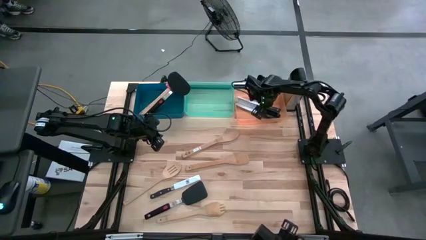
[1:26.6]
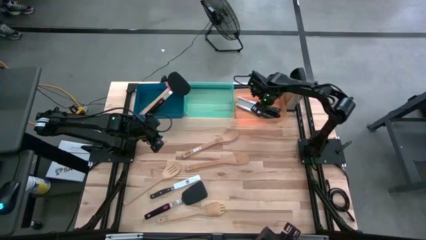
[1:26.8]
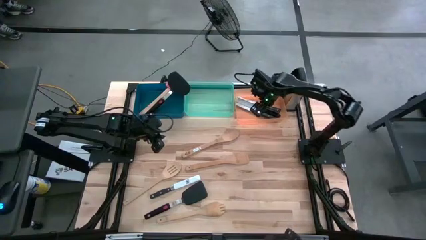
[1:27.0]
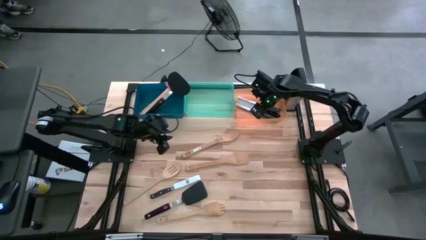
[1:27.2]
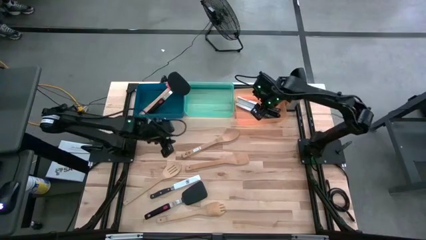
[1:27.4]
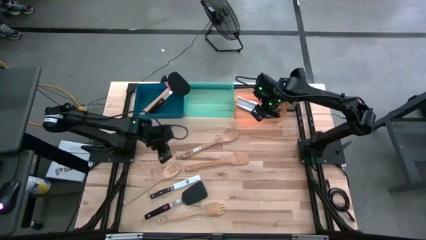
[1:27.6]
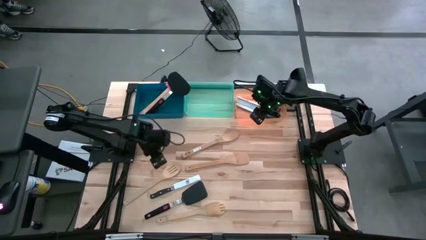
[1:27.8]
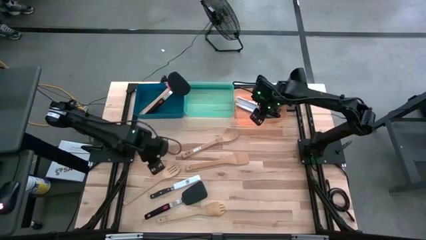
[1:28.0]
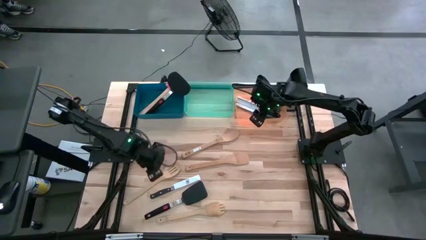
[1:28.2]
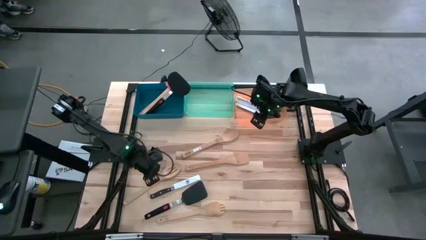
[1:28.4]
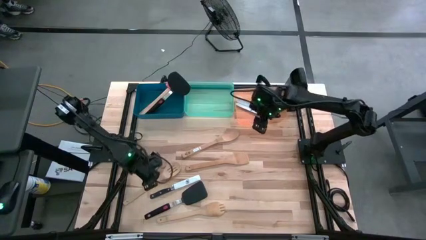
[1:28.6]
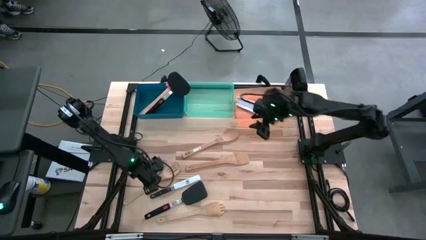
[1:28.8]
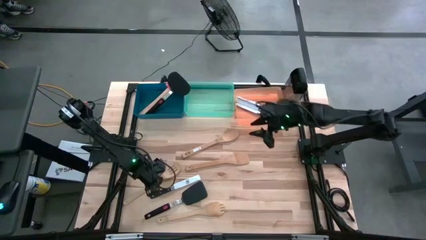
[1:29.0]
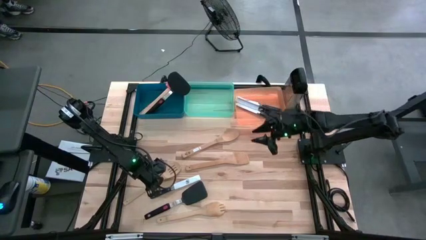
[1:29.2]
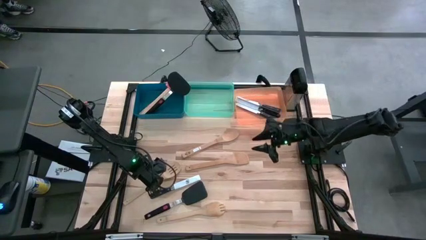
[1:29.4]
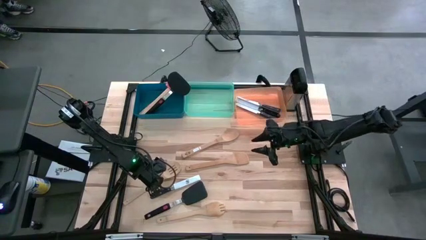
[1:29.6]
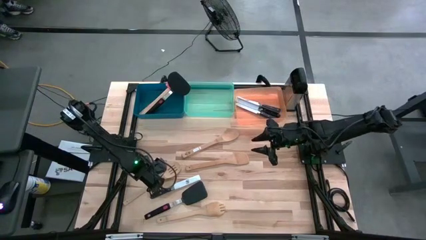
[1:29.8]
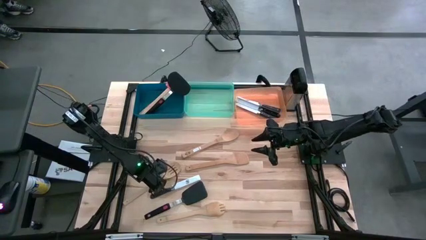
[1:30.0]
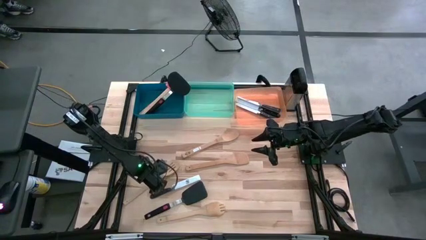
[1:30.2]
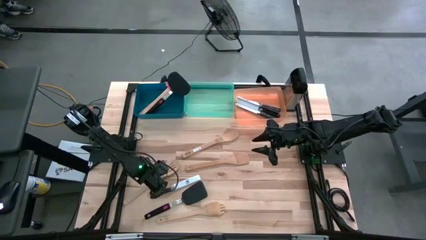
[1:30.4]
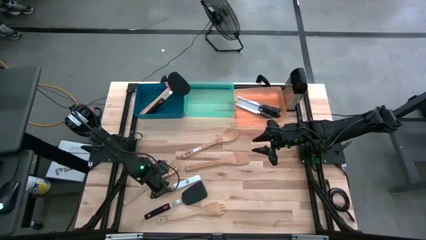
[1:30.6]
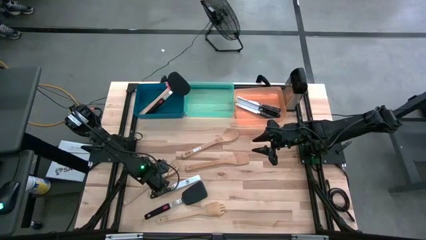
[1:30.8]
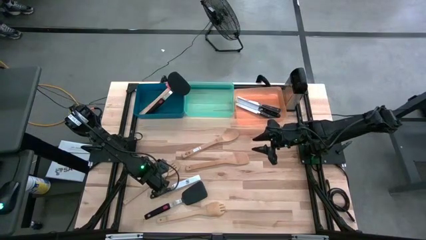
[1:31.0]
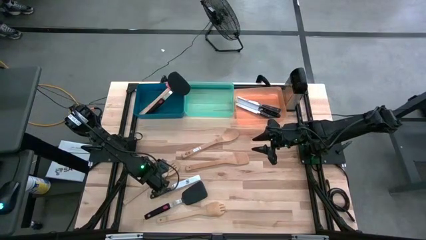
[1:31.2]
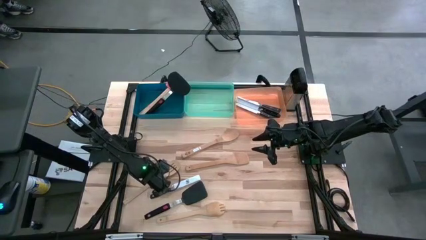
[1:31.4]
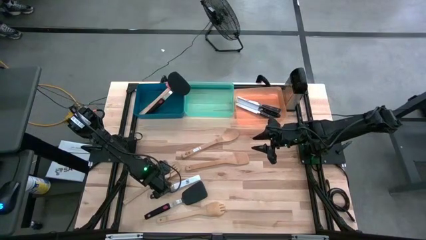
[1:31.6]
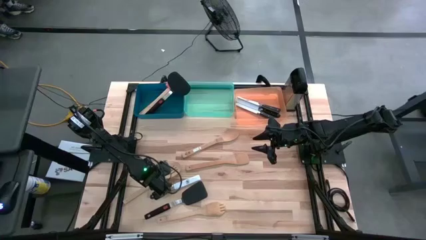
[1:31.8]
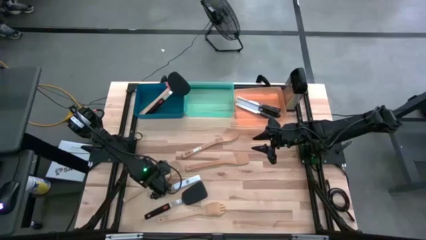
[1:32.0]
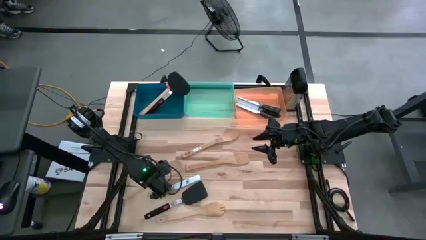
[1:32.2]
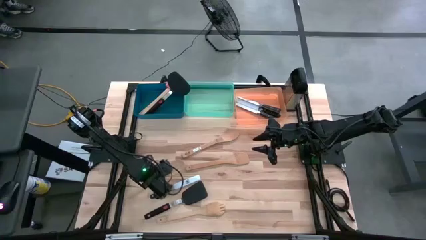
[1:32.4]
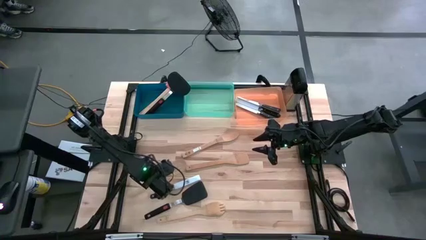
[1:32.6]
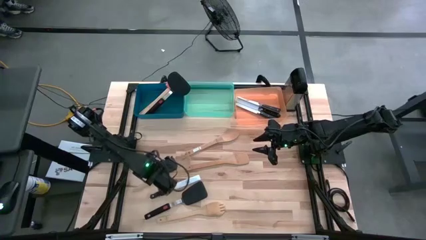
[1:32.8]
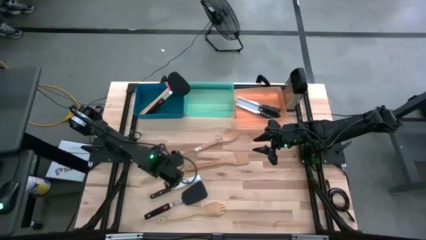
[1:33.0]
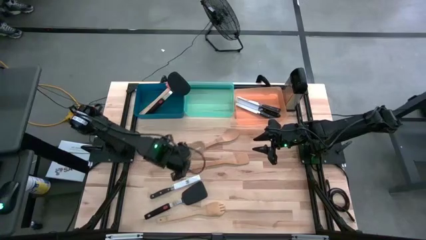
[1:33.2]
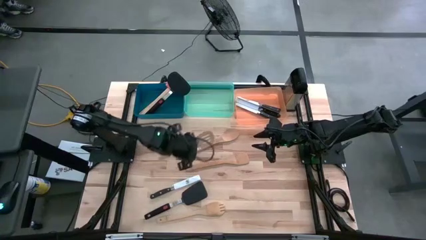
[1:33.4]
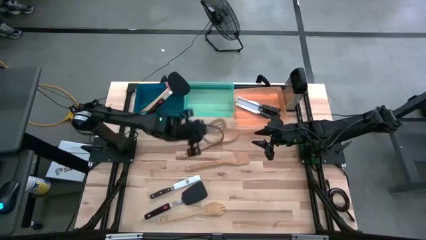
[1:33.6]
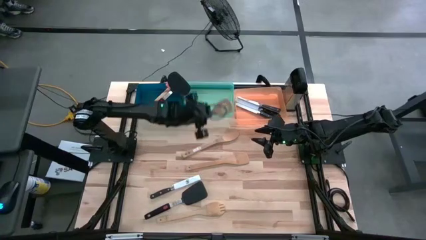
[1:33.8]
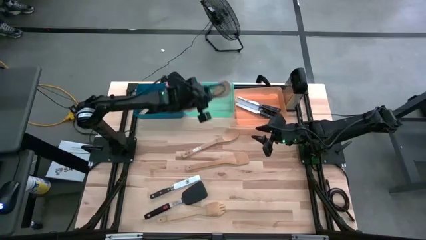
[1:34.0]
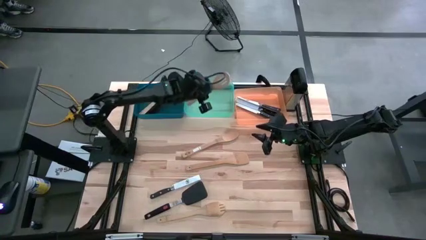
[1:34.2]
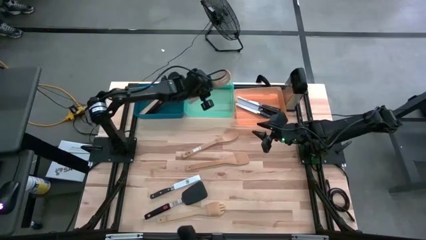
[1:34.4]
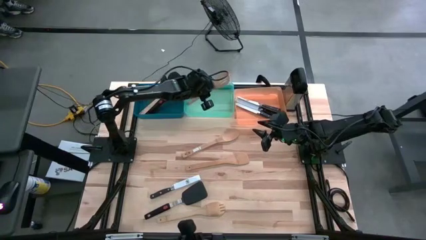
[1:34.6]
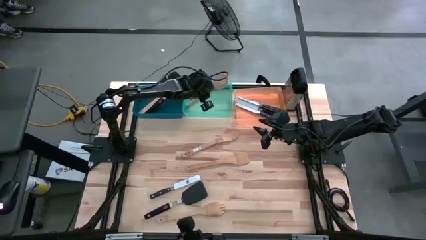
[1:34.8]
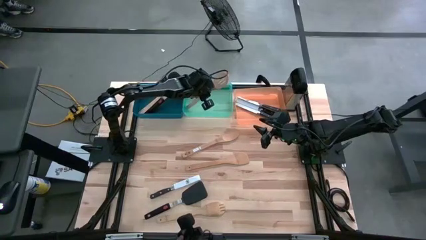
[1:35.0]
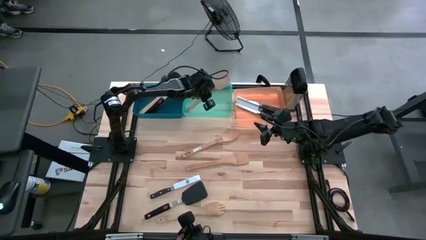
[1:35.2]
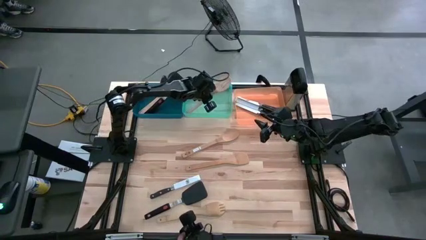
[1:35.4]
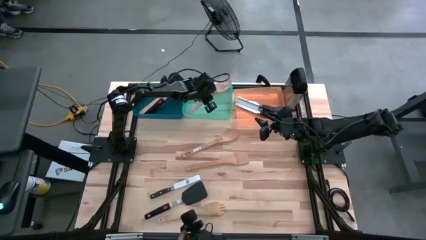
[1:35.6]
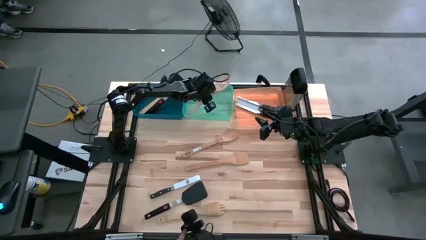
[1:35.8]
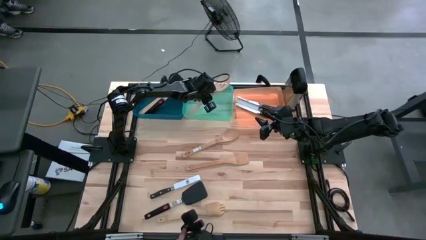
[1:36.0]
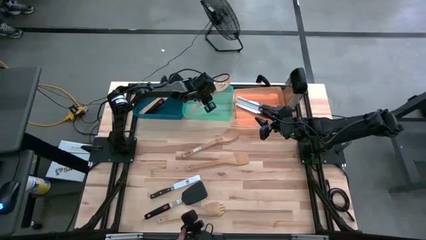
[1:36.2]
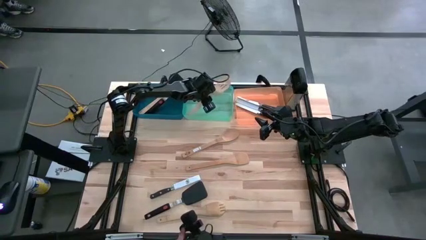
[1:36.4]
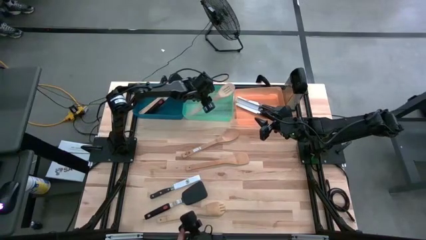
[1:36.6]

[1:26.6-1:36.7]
Task: Pick & Place Kitchen Items
Put the serving spoon into the green bin
